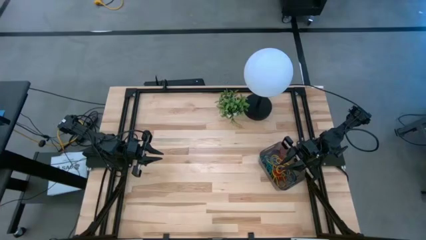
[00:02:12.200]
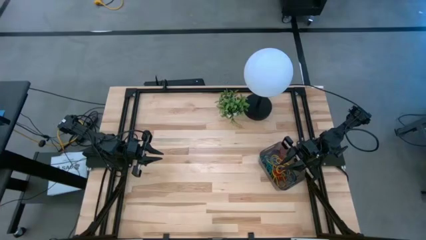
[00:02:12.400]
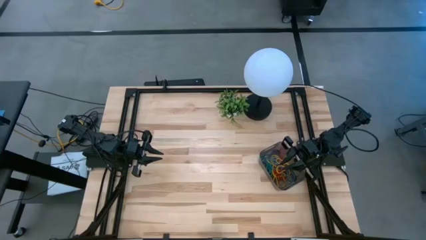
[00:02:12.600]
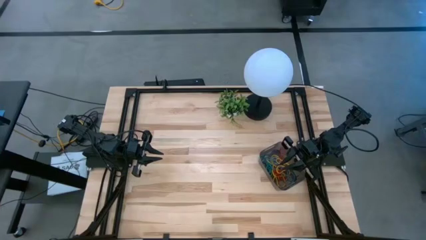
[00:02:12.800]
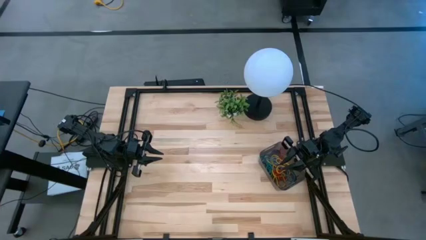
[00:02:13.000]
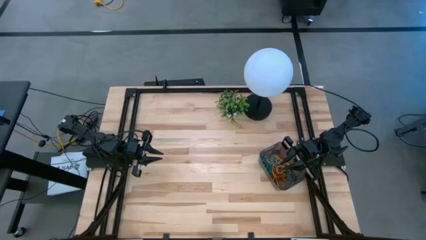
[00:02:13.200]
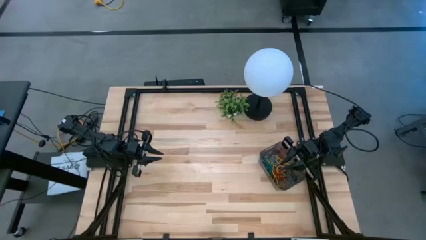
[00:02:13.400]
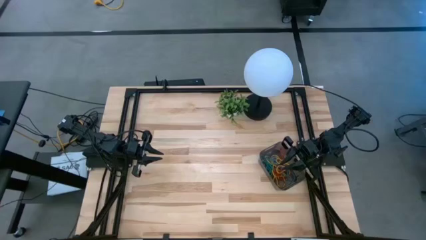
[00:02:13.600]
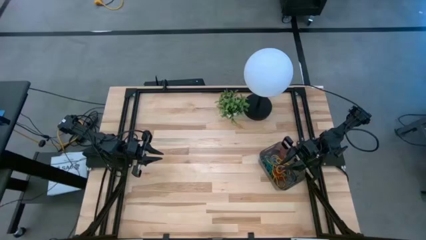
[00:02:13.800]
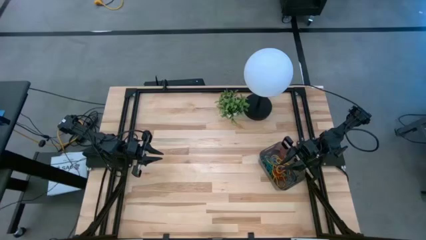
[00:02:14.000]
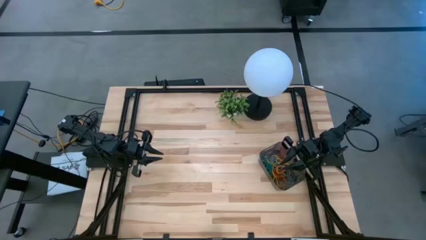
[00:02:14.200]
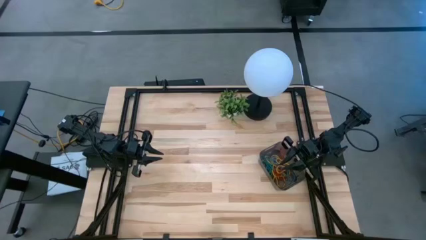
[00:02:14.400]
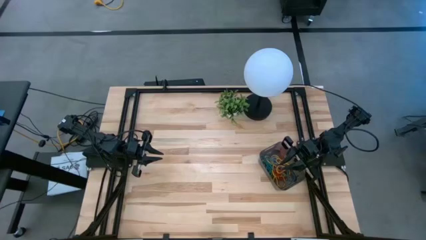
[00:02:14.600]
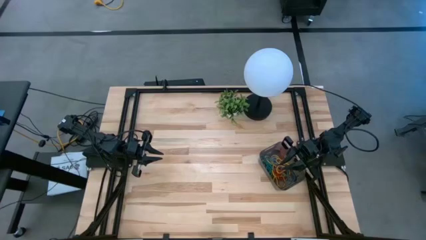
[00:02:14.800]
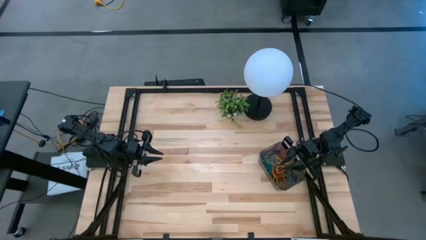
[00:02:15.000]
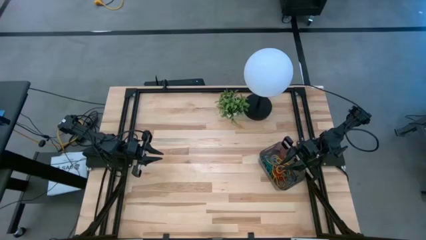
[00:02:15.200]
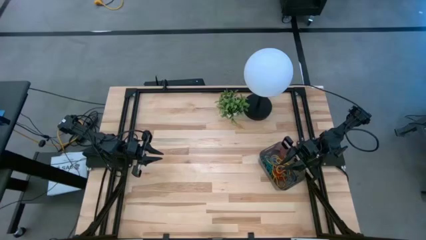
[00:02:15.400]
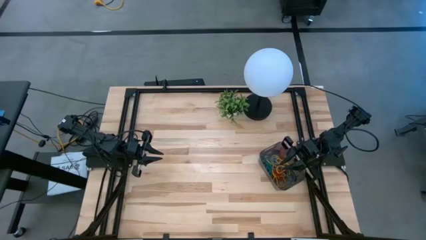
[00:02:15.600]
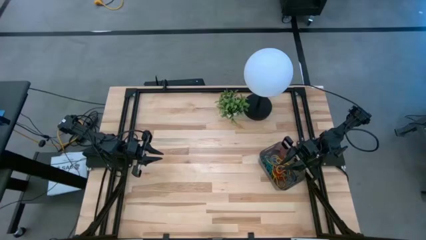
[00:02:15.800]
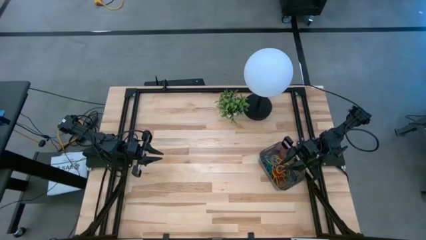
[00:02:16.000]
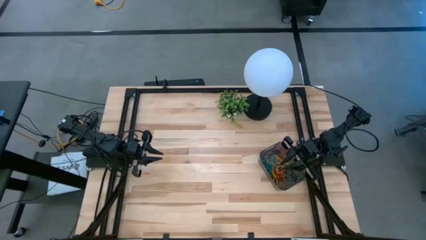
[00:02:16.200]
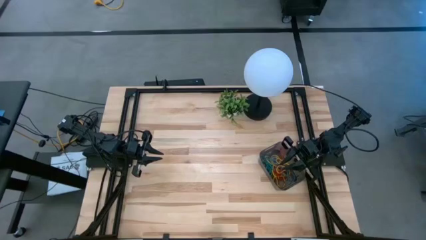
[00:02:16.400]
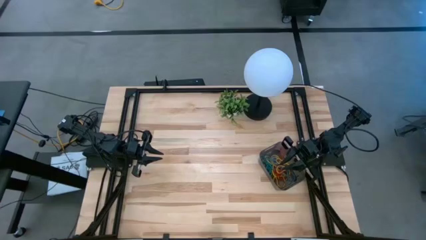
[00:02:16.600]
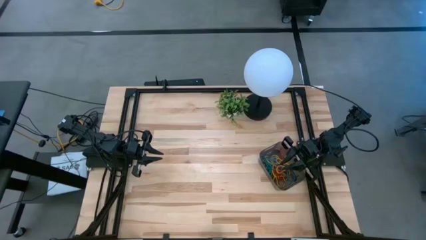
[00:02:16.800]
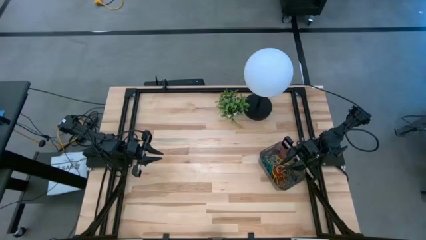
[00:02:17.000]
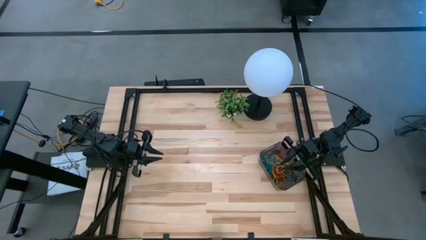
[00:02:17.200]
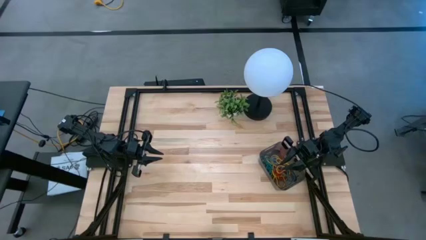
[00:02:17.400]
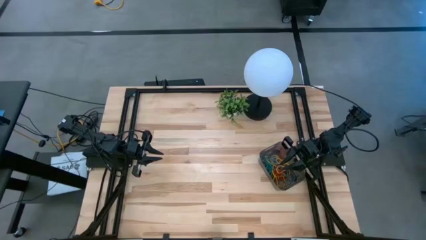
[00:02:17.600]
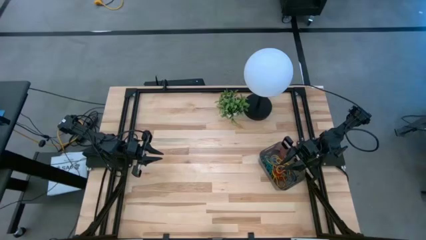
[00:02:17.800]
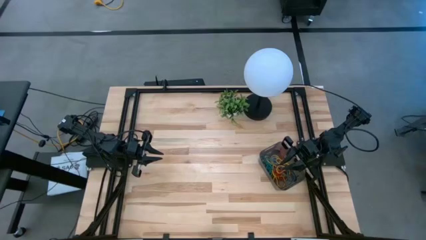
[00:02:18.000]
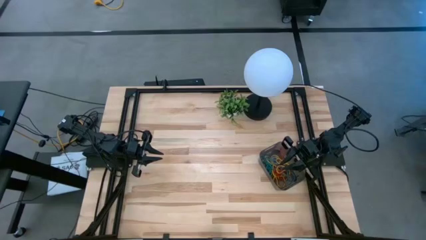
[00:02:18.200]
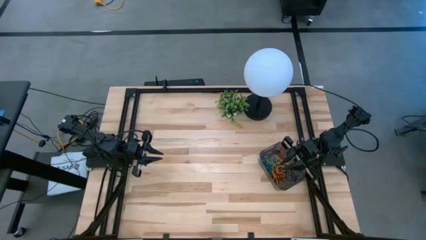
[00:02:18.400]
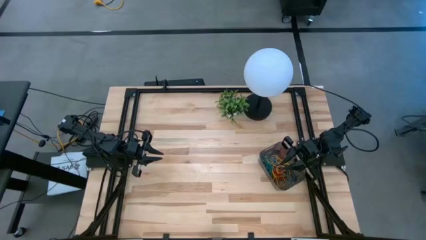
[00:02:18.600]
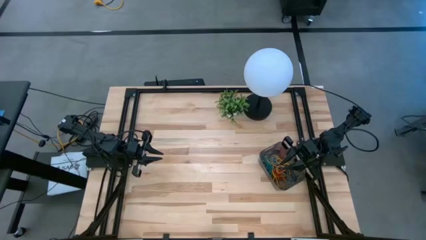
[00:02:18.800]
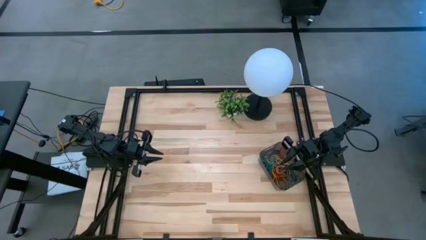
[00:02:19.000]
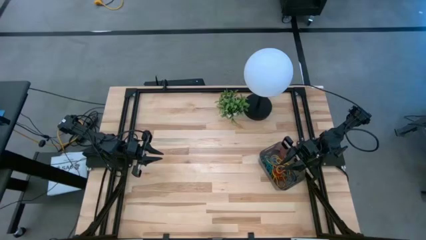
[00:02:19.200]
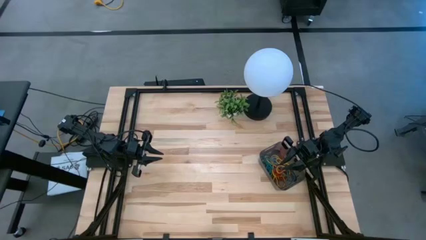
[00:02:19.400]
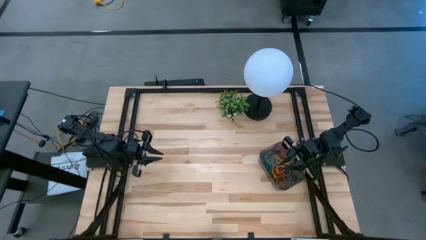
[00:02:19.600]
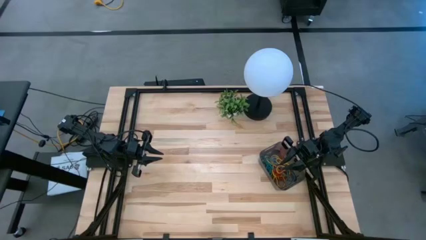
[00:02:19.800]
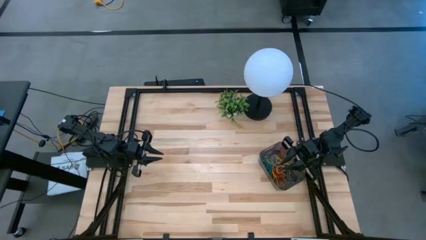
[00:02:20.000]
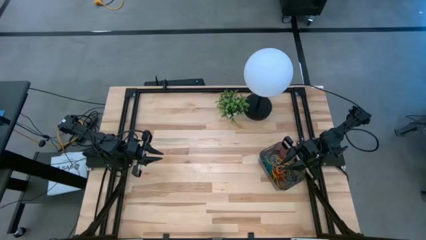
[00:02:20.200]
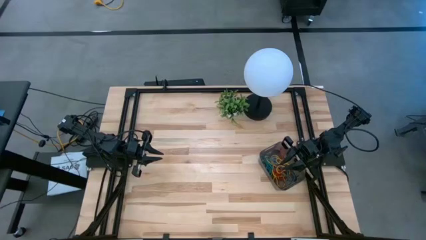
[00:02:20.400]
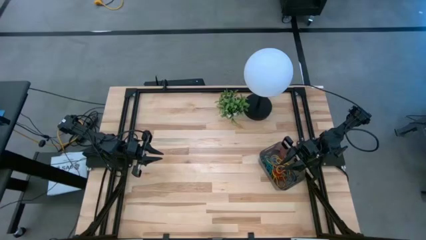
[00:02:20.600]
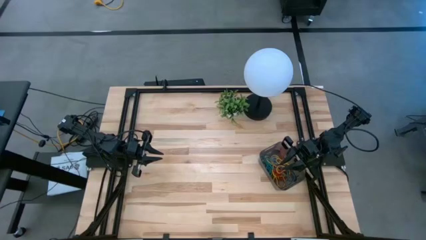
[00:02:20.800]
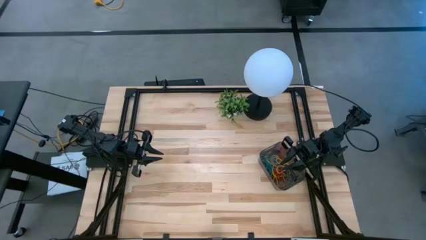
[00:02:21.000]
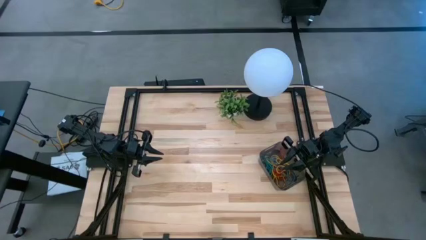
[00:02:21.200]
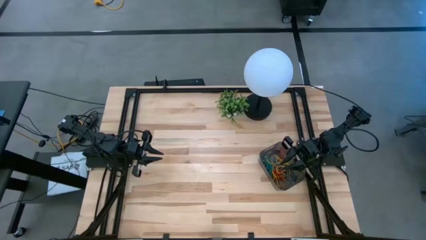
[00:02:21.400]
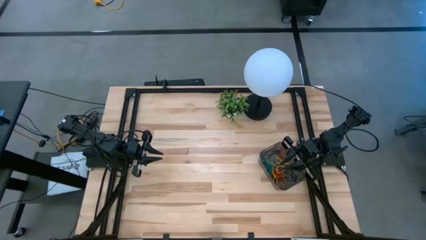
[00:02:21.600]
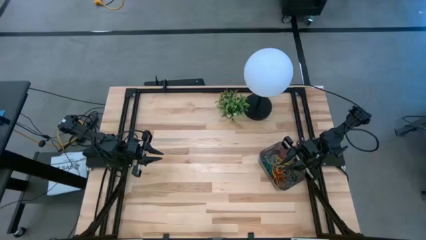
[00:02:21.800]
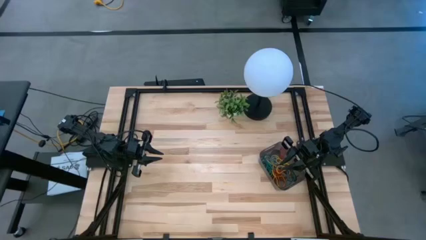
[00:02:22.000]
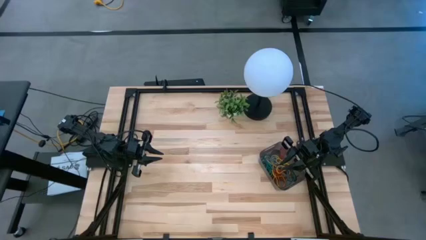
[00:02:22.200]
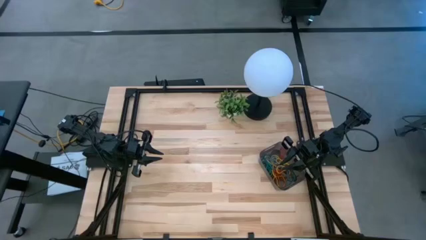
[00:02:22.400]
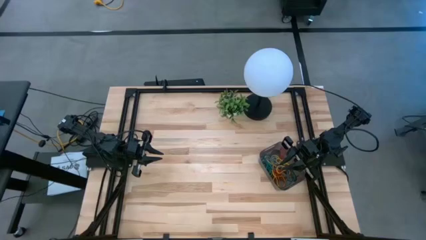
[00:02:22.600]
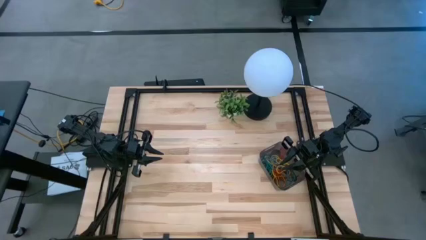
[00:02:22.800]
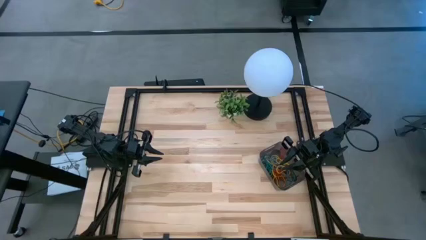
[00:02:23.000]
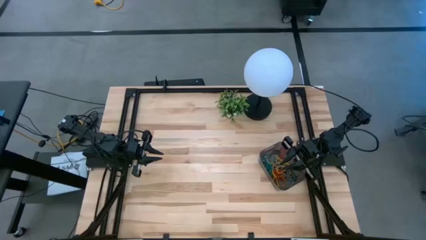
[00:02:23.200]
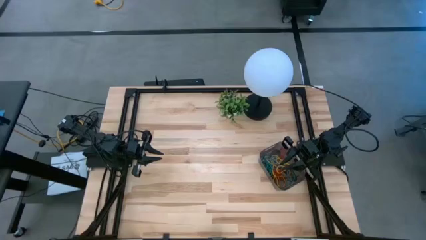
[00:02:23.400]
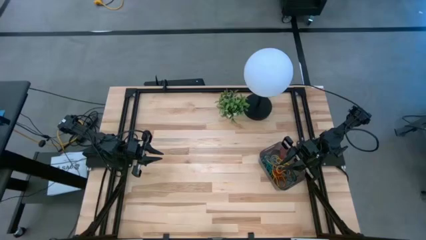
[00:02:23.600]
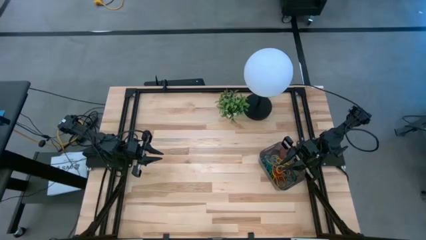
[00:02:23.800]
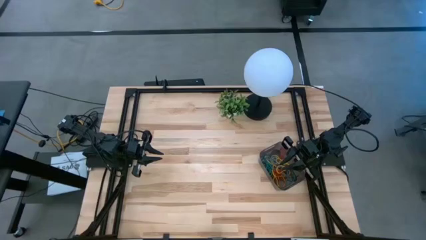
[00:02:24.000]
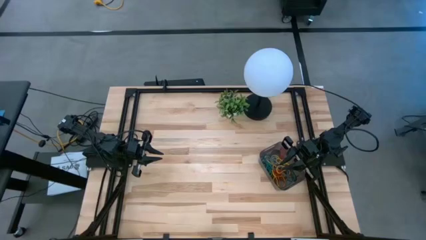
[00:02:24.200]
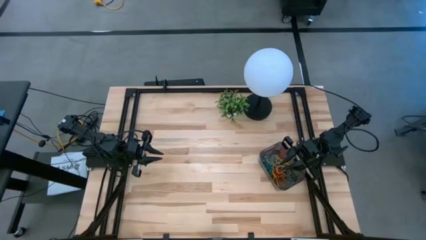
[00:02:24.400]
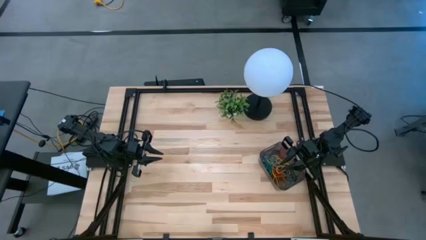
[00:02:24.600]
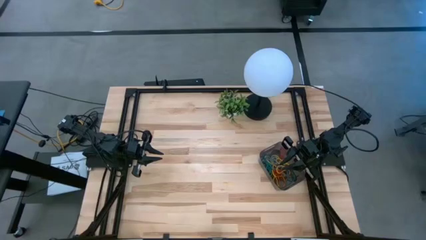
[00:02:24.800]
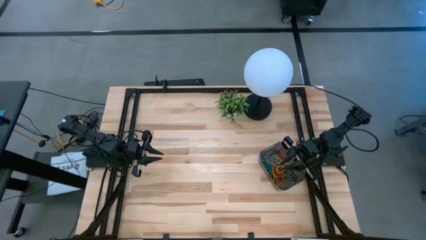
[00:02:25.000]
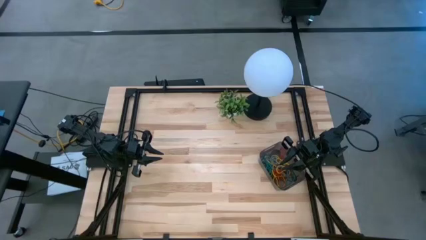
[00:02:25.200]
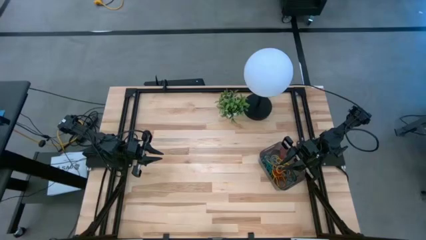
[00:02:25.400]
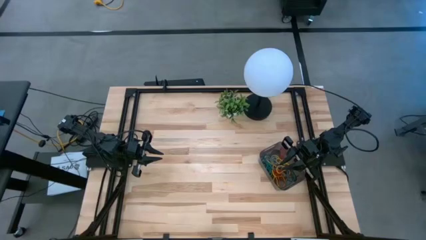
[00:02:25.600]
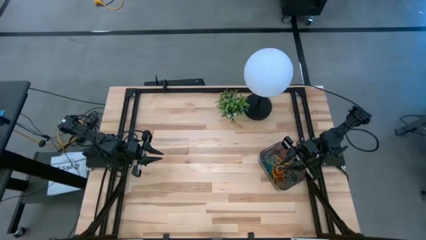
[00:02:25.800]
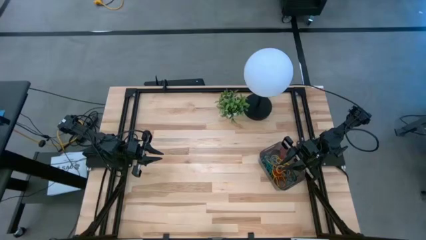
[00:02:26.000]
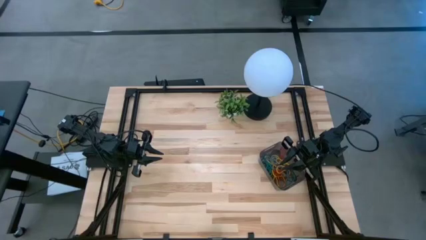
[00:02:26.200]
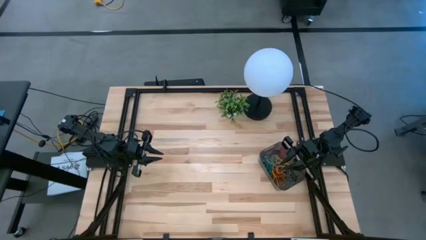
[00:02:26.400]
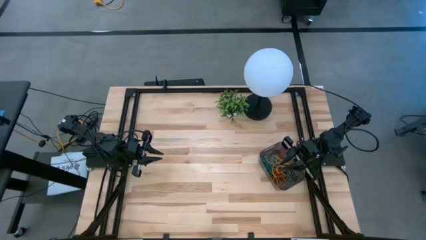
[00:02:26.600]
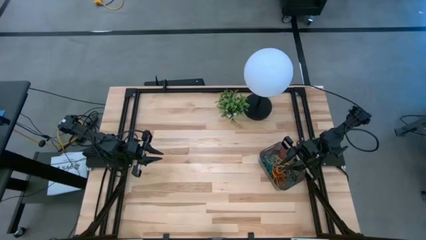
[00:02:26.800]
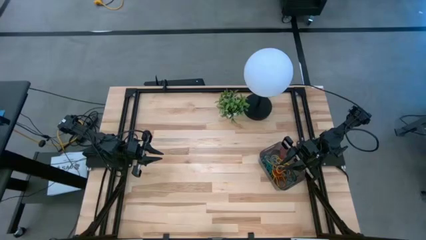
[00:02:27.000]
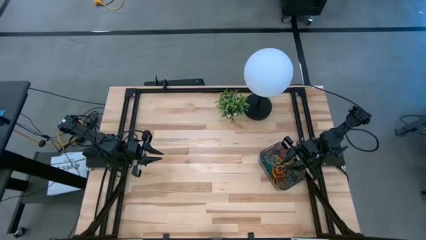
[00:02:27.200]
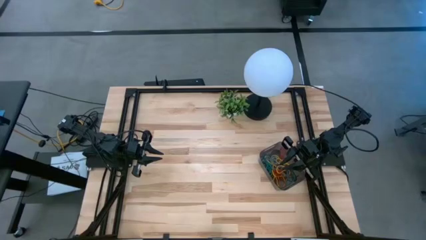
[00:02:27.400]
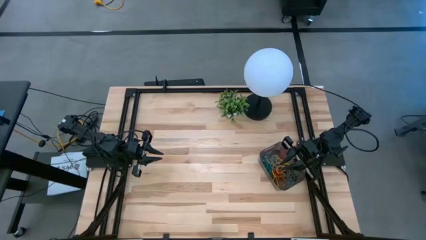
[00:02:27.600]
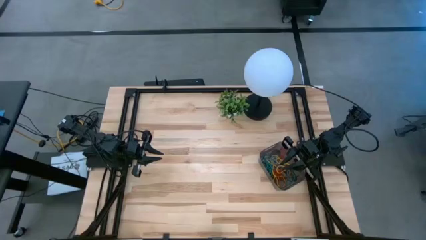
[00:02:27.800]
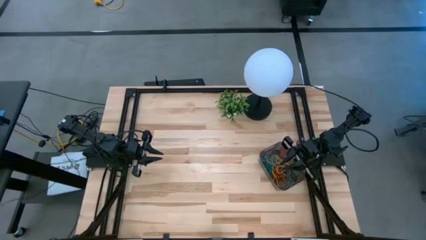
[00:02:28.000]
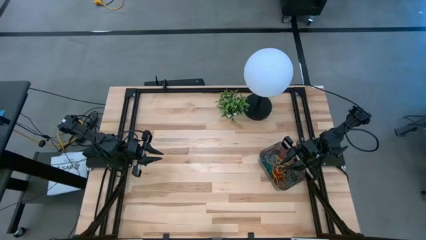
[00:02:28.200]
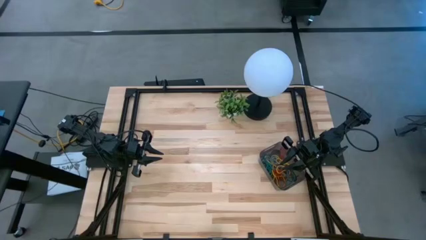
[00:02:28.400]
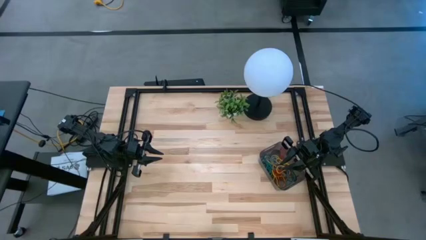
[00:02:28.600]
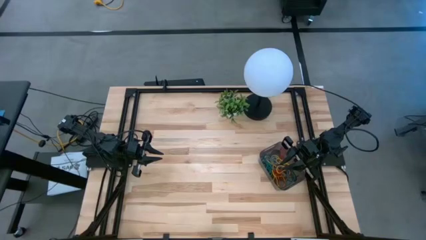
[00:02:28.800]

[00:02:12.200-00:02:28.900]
Task: Pick and place items into bin
Return to Home Position
